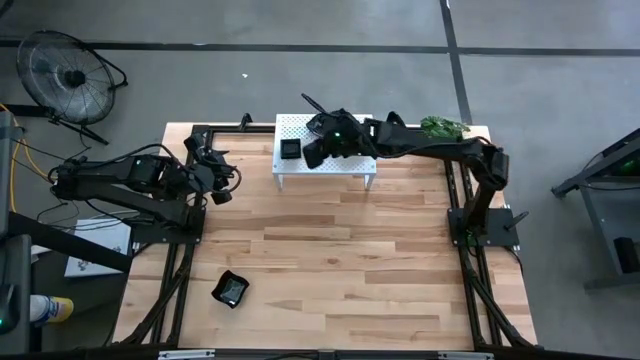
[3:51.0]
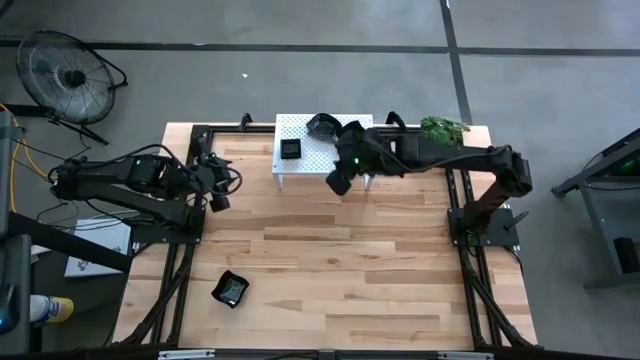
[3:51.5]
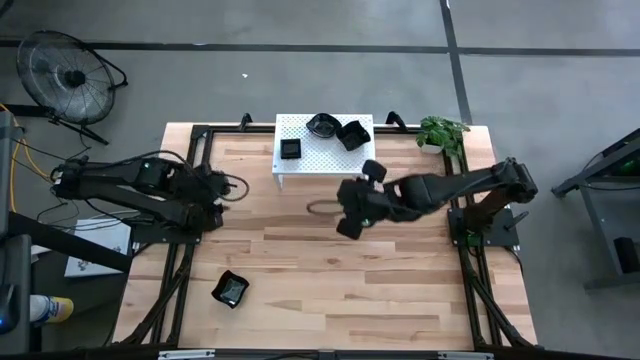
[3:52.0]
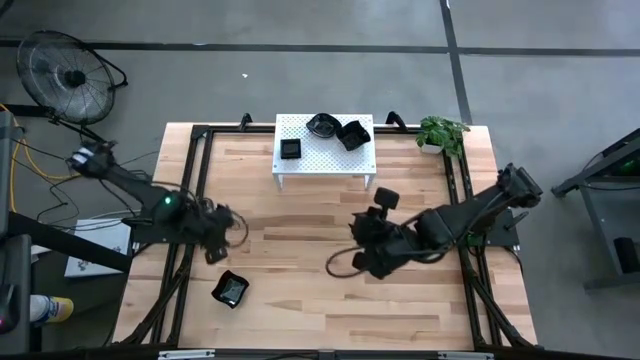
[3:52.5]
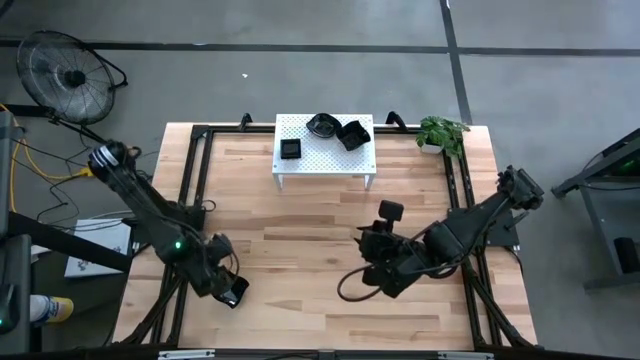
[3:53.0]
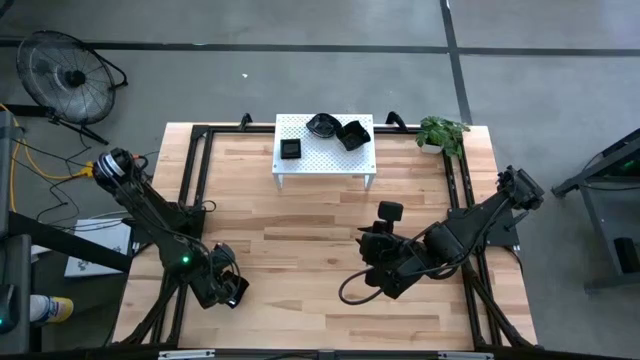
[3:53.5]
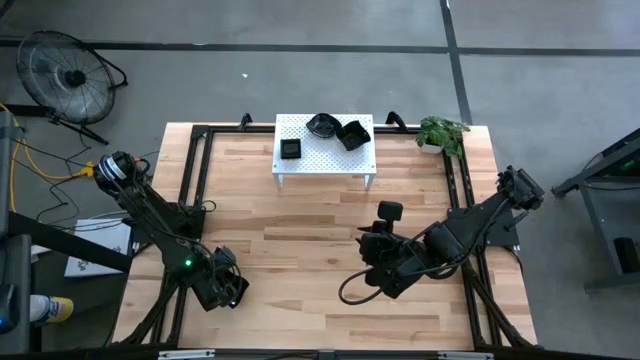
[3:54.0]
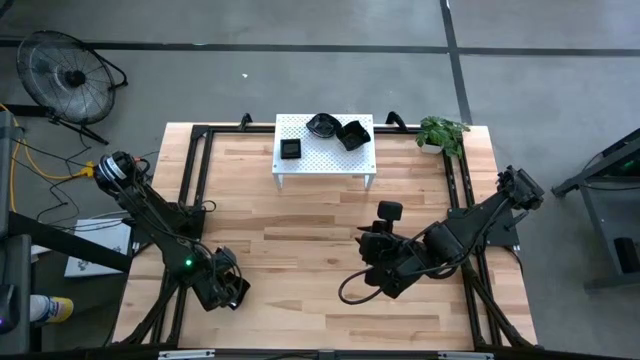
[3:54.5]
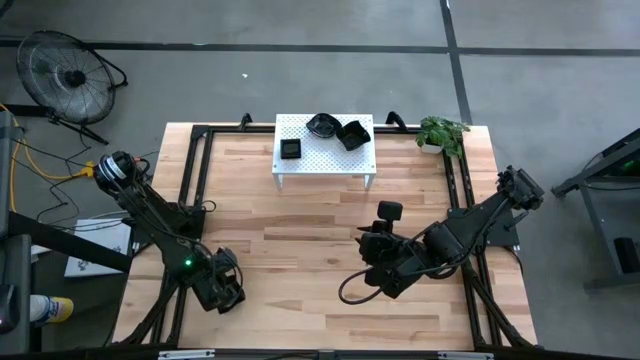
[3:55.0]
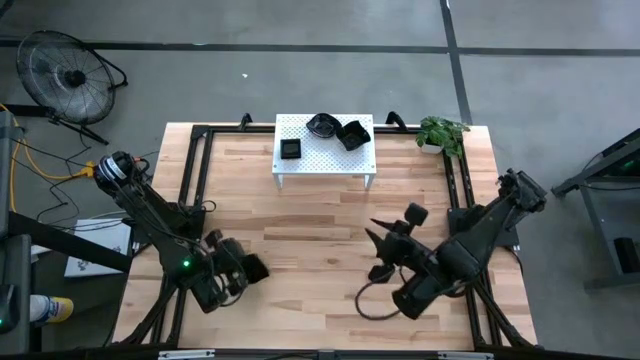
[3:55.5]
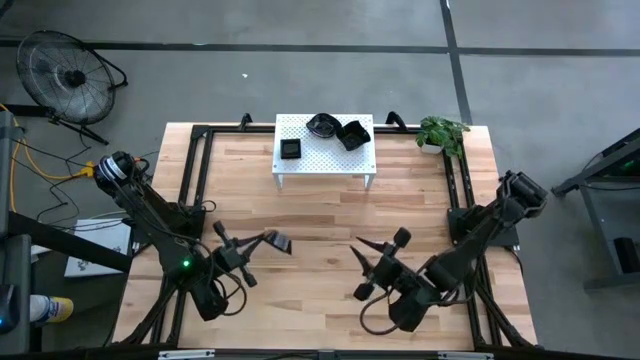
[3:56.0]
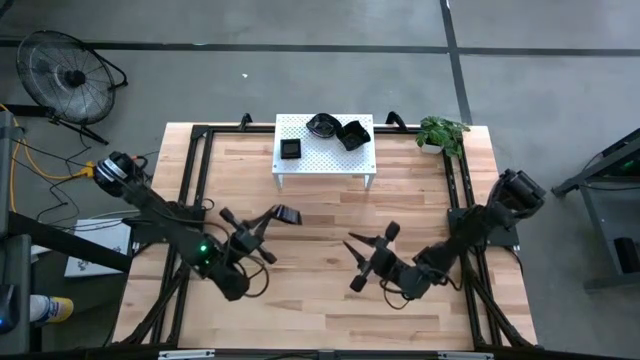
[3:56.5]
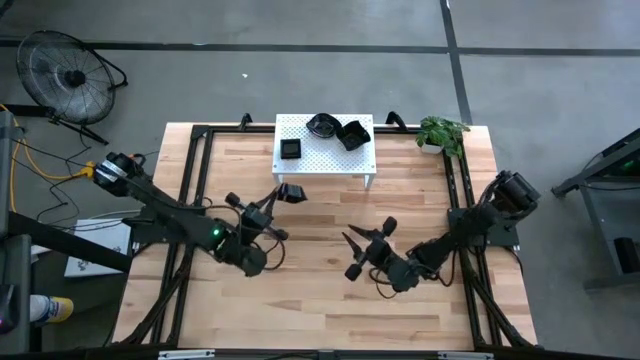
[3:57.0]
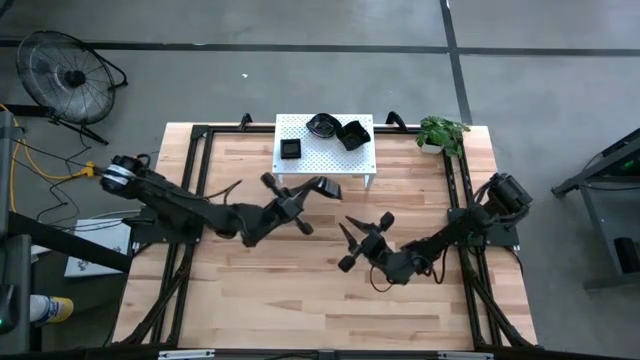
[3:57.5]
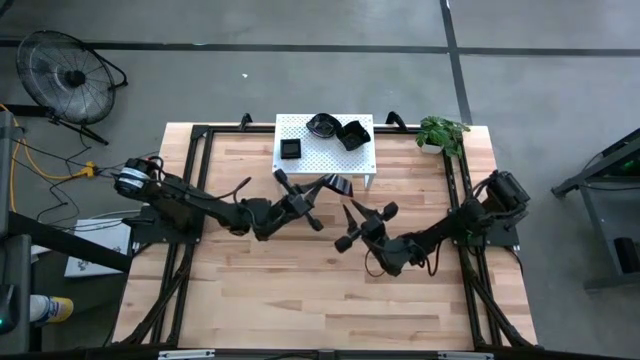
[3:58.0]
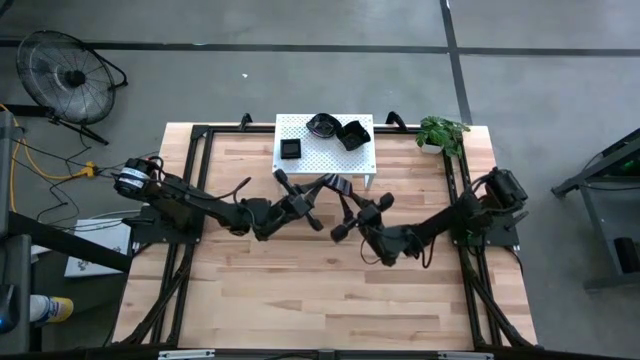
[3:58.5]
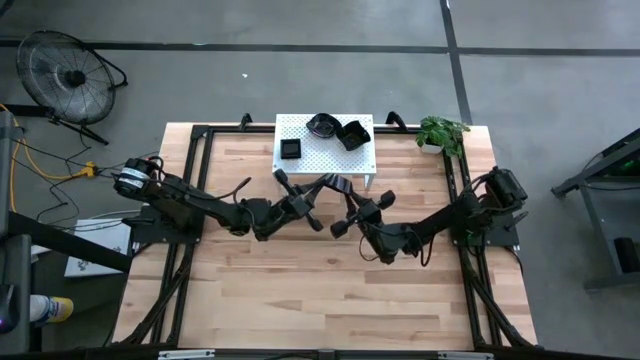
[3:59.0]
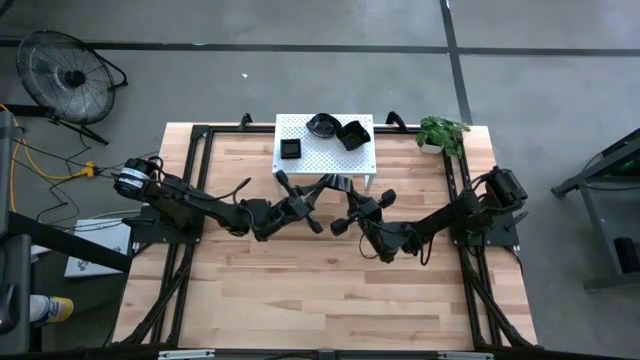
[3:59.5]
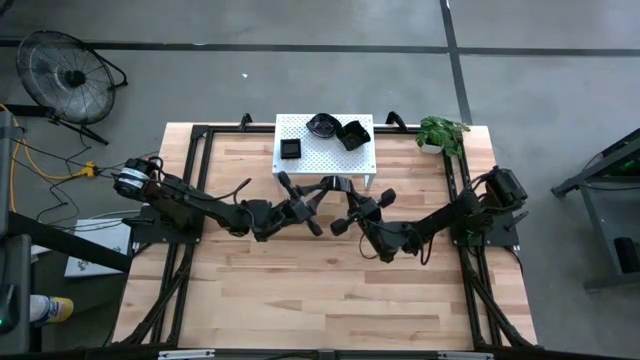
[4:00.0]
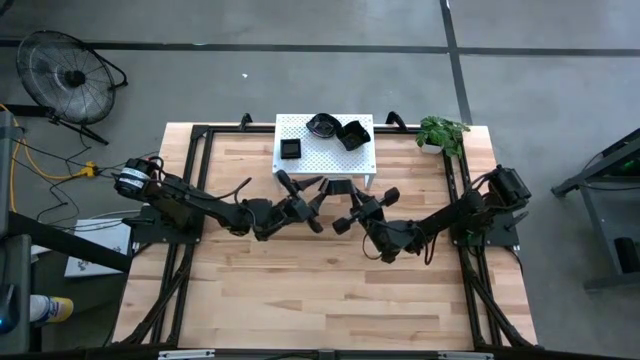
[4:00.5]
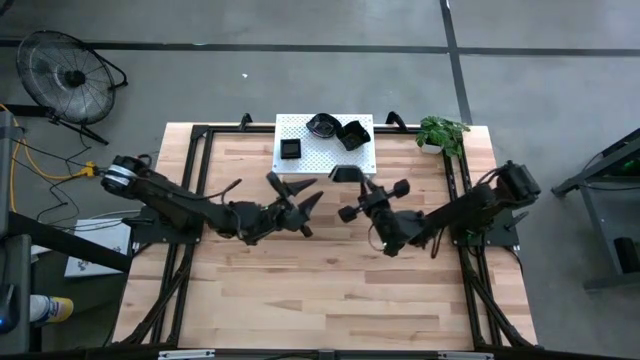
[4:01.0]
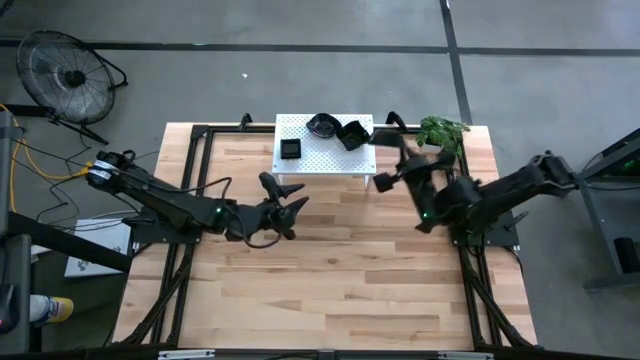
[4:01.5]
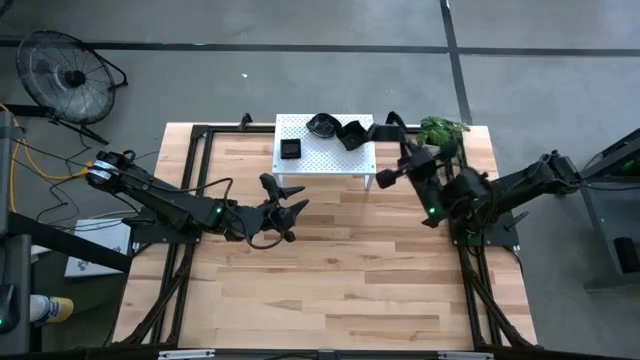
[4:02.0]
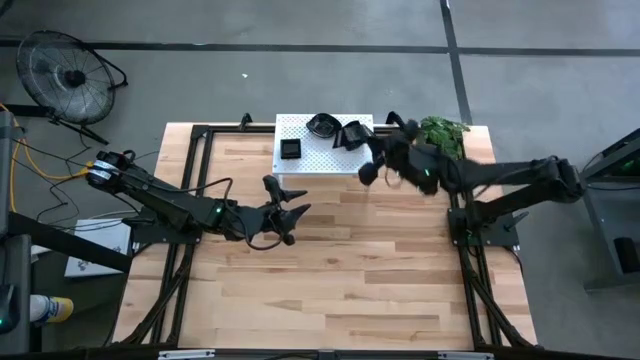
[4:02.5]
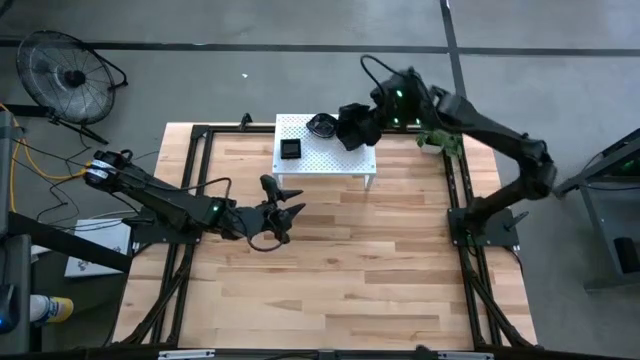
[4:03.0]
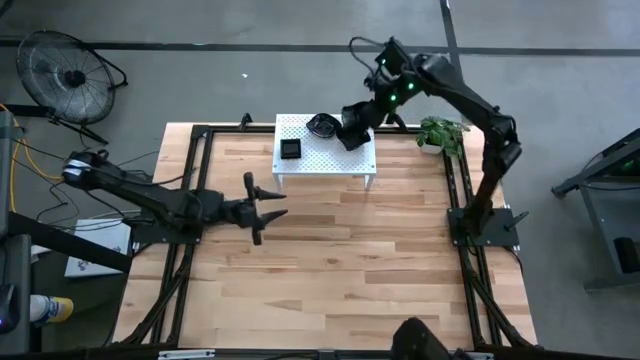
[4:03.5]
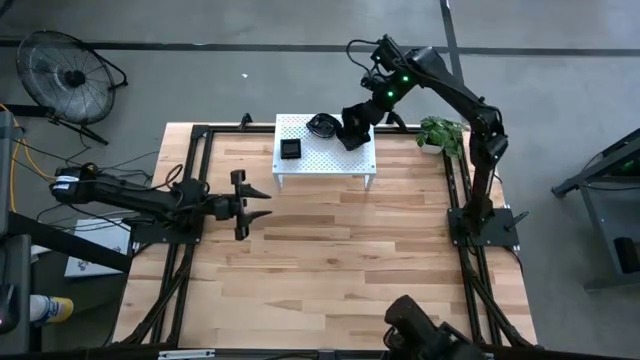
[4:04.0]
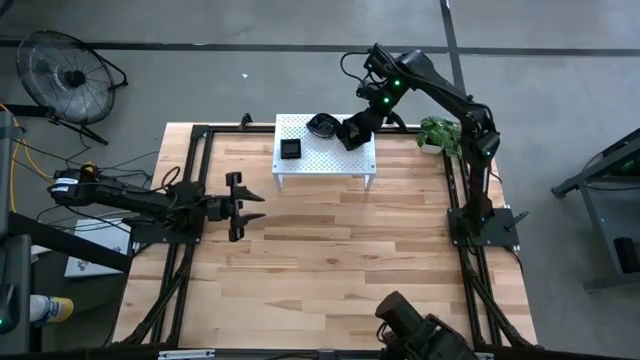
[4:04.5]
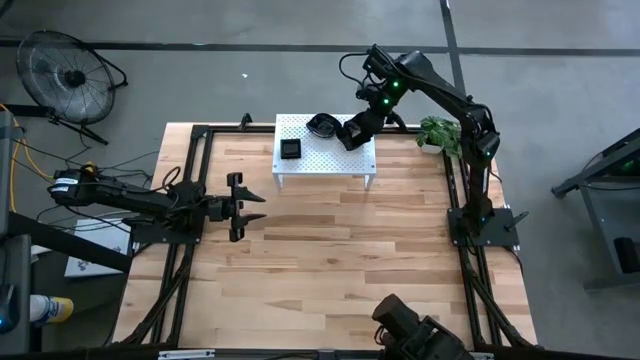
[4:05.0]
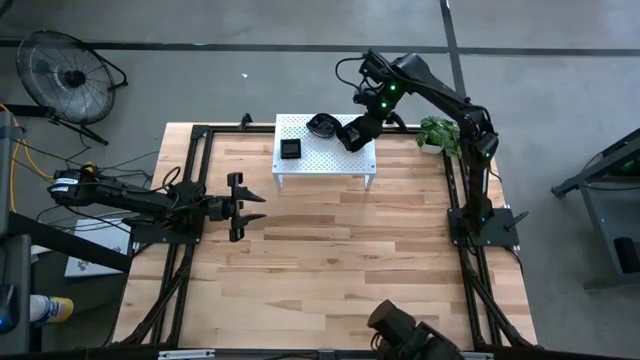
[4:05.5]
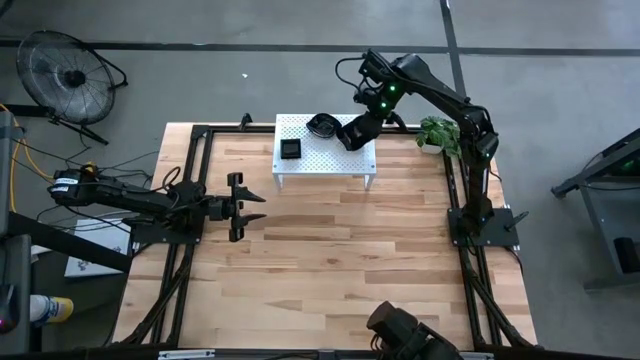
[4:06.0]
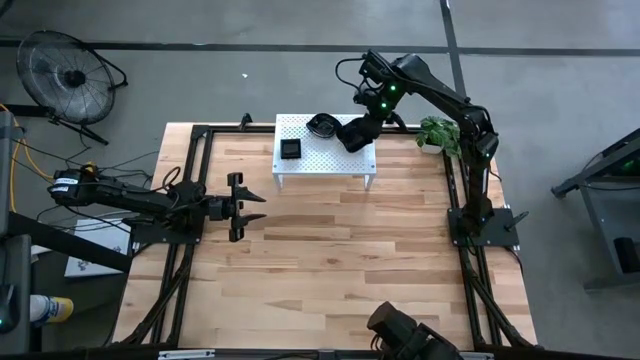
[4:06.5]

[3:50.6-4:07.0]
Task: Pick & Place Mini shaped plates
Stack the black distorted square plate on top of the black distorted square plate on the shelf

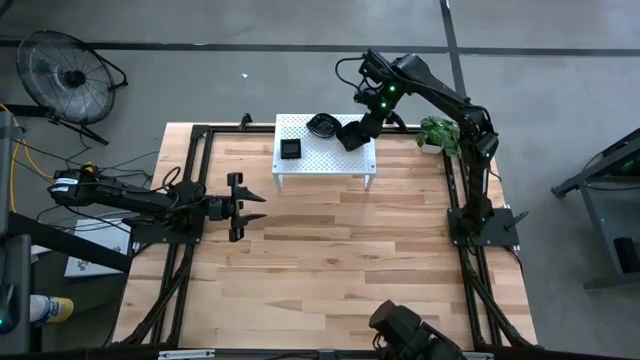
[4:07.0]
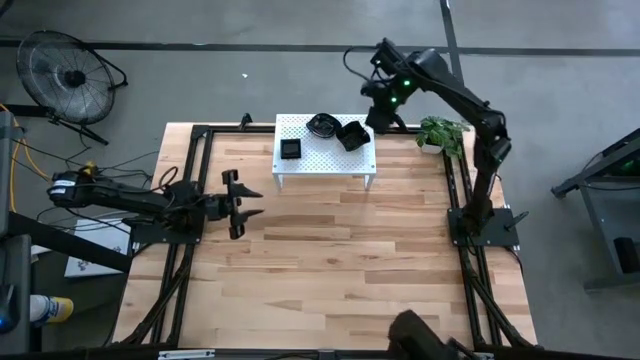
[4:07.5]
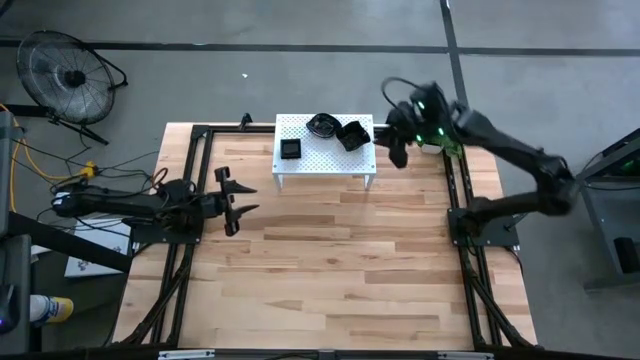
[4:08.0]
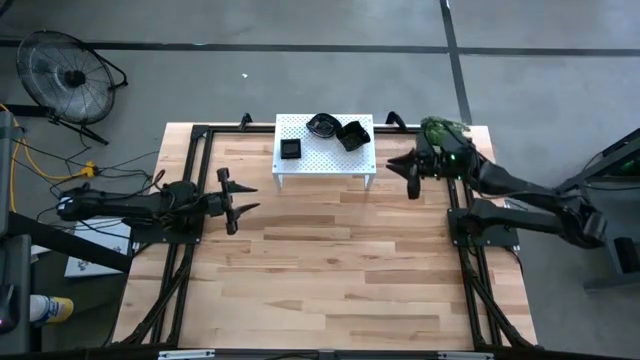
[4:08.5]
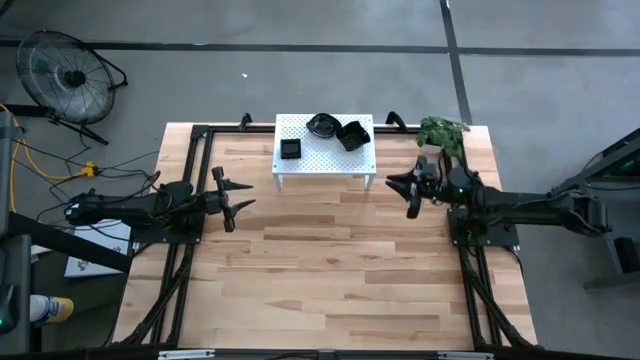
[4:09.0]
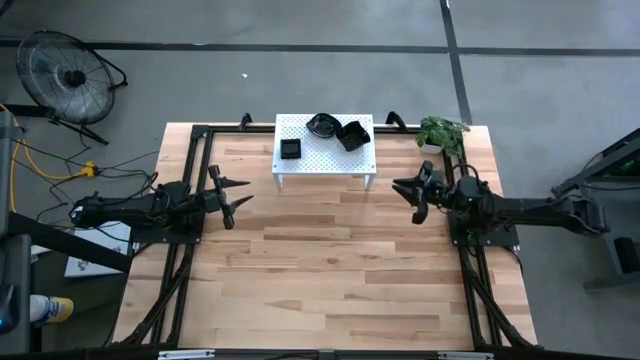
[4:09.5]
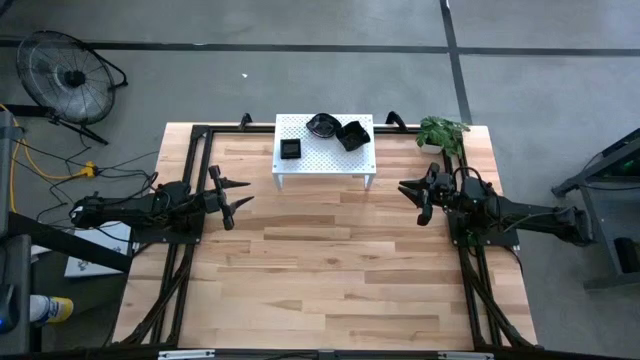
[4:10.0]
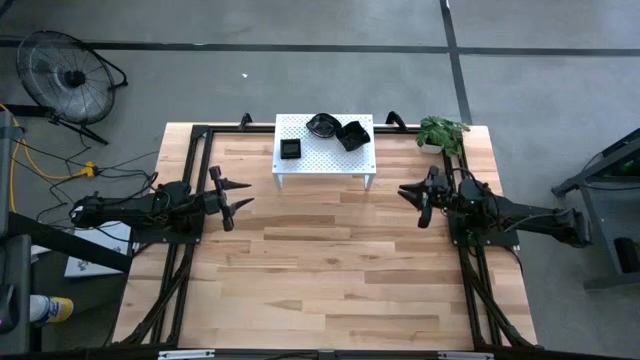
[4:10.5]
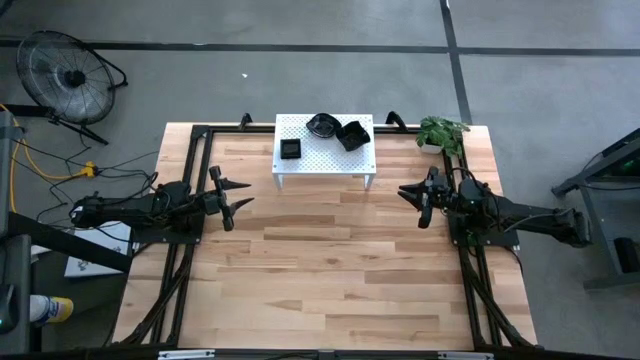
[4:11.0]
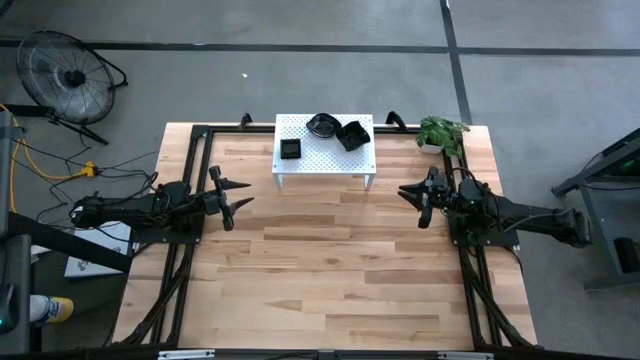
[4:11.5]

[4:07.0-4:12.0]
Return to Home Position

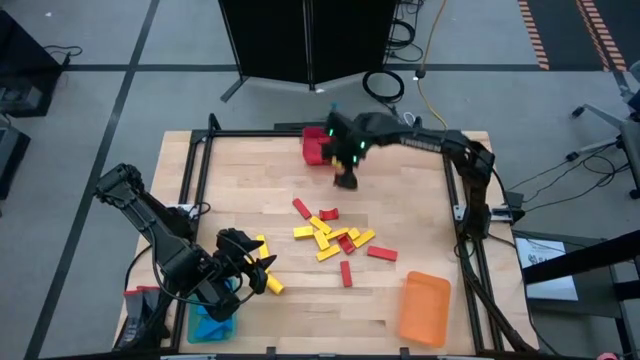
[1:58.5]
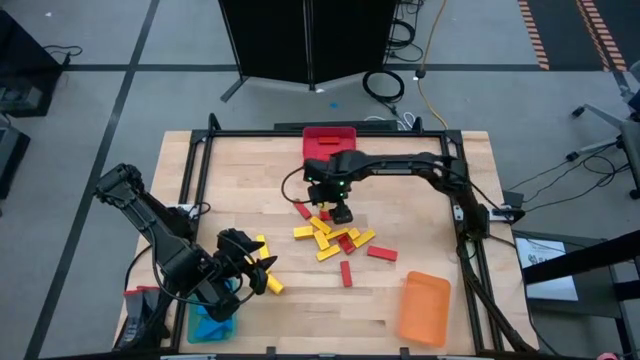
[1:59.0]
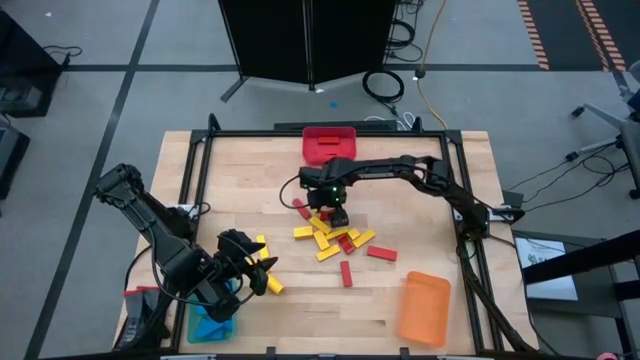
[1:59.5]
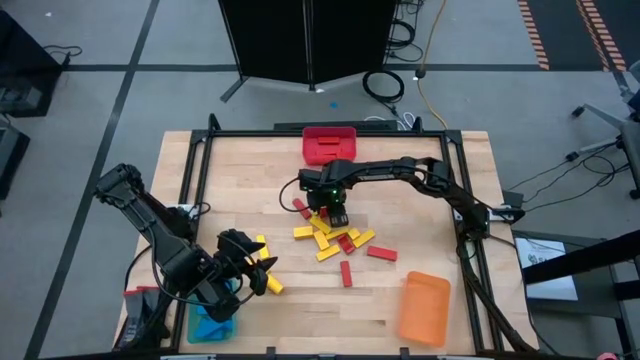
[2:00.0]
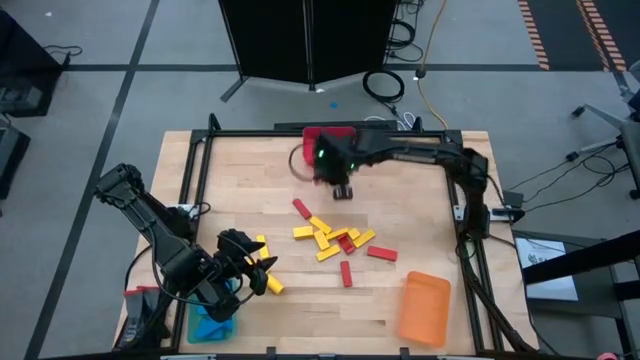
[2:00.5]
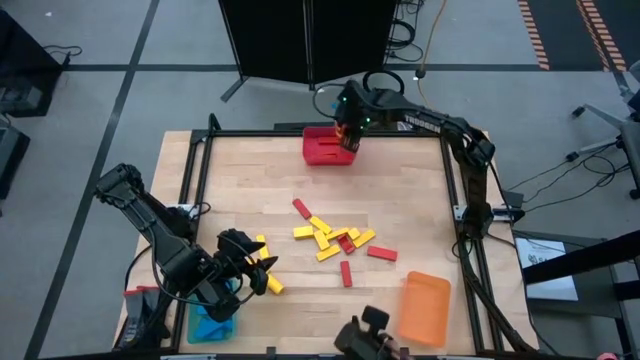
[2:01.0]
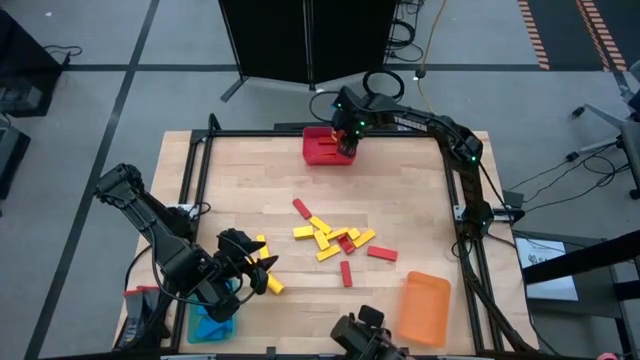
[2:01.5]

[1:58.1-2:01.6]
Task: Sort blocks
Put the red block into the red bin
